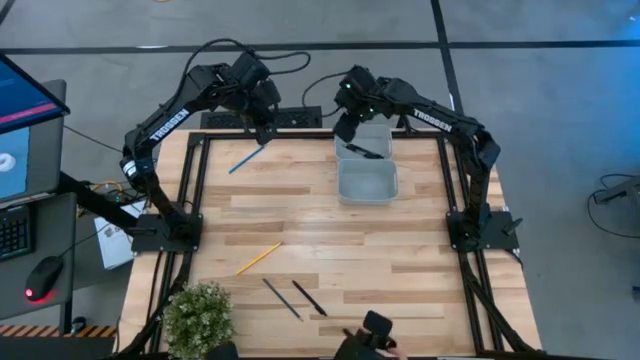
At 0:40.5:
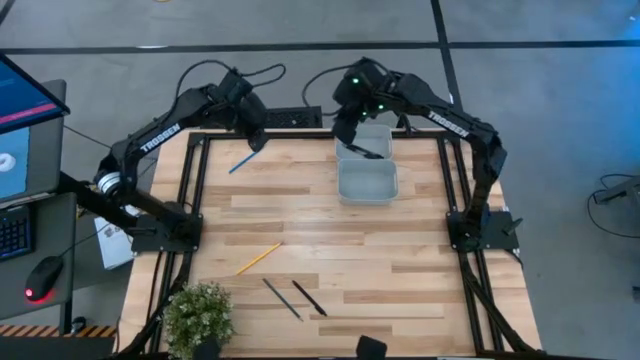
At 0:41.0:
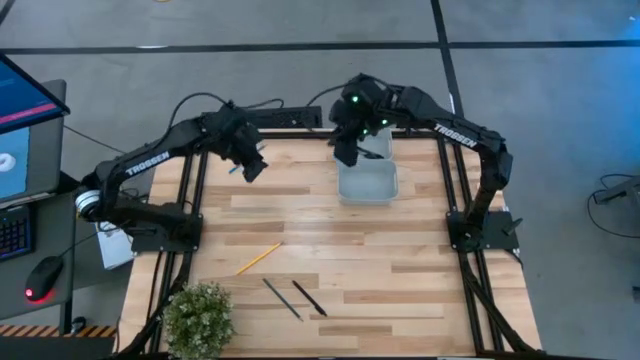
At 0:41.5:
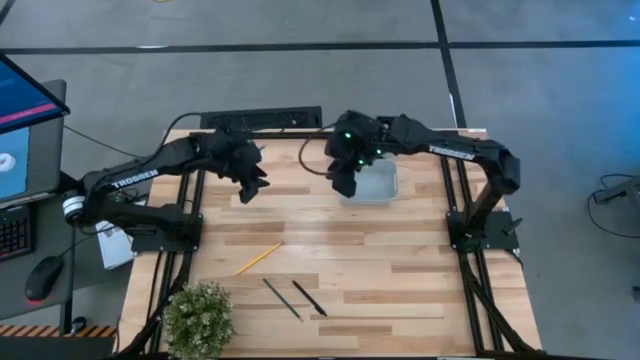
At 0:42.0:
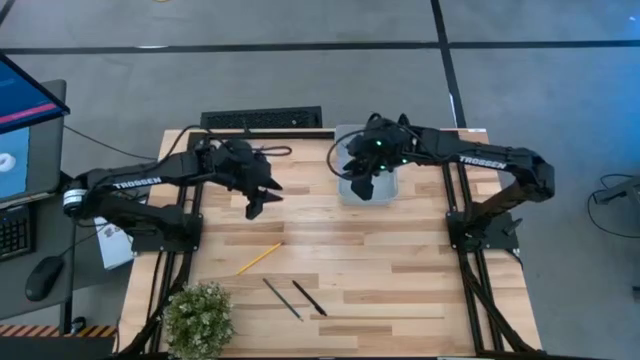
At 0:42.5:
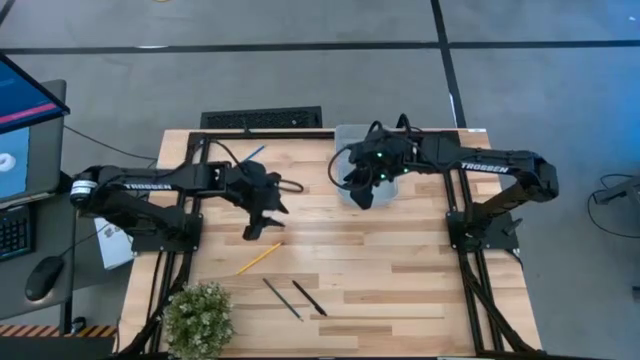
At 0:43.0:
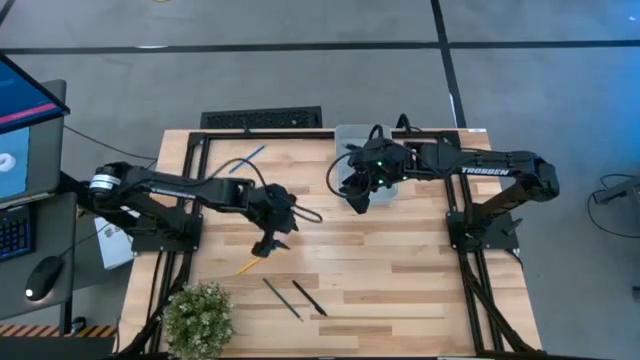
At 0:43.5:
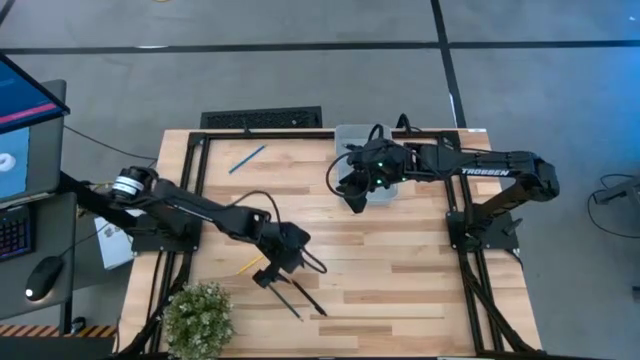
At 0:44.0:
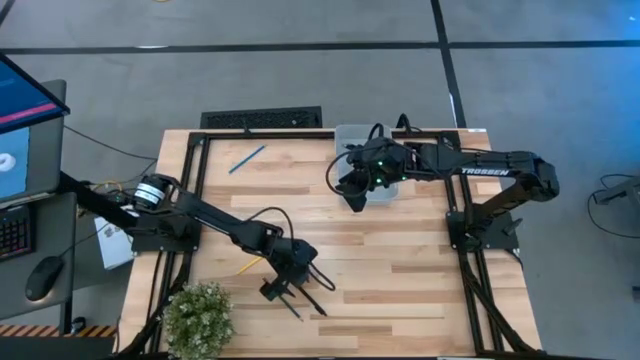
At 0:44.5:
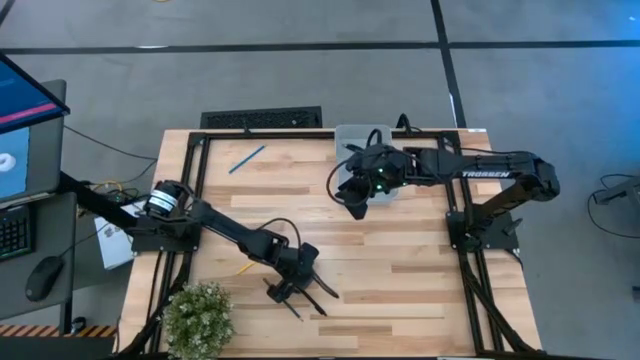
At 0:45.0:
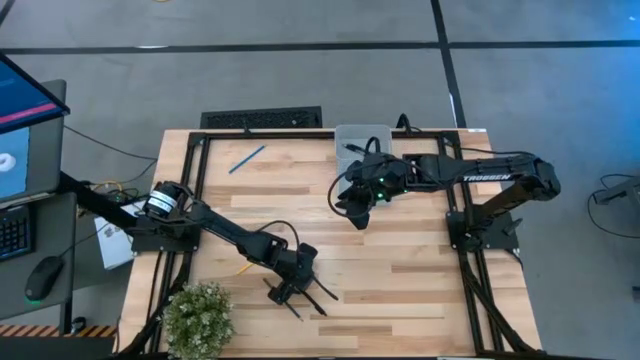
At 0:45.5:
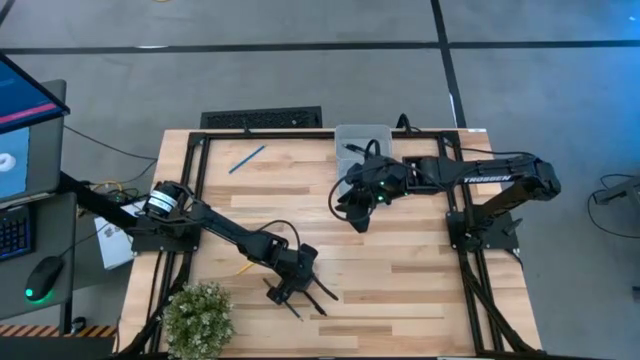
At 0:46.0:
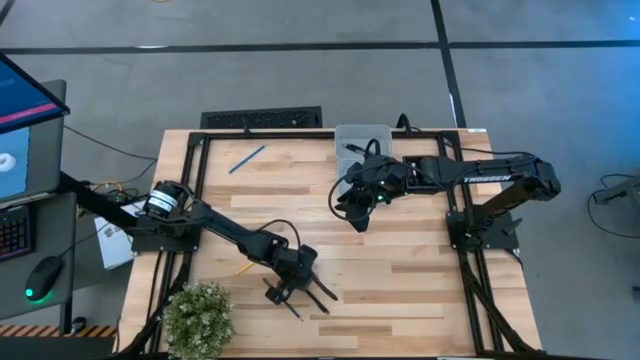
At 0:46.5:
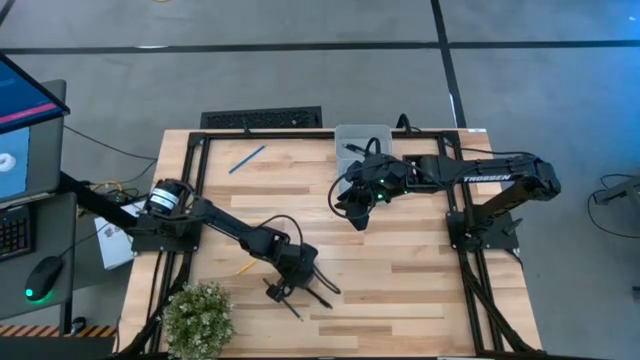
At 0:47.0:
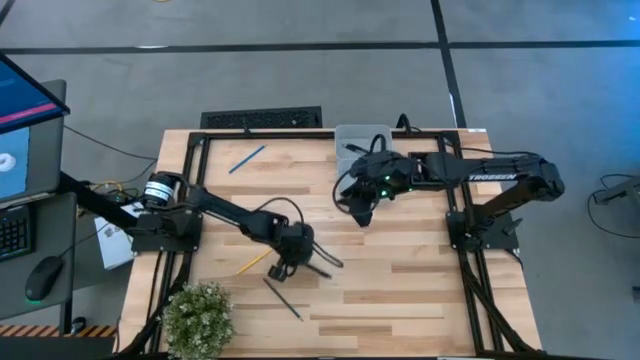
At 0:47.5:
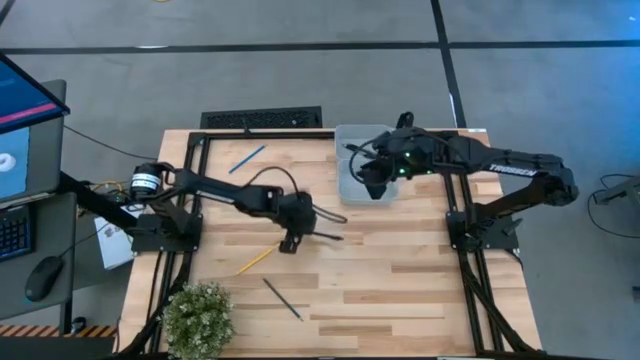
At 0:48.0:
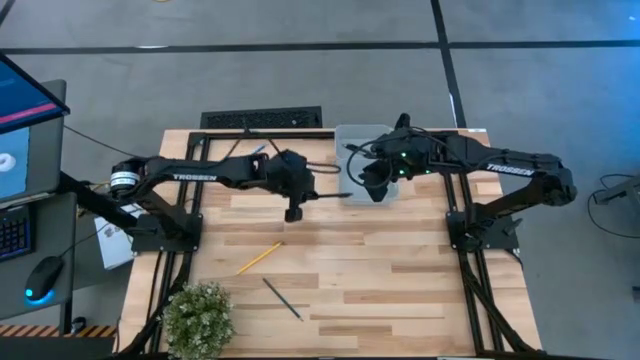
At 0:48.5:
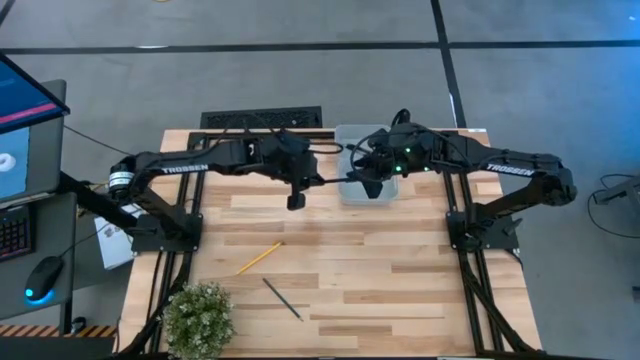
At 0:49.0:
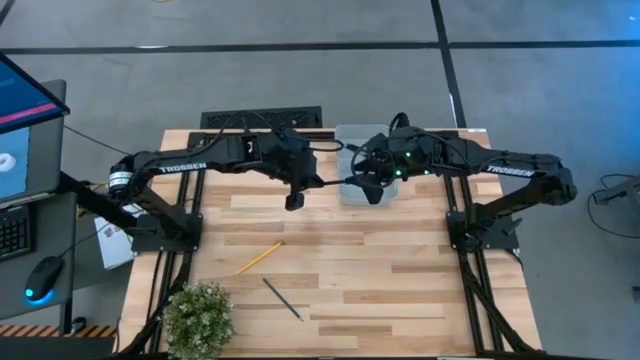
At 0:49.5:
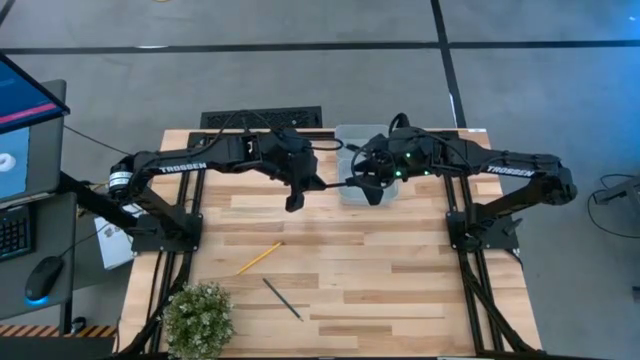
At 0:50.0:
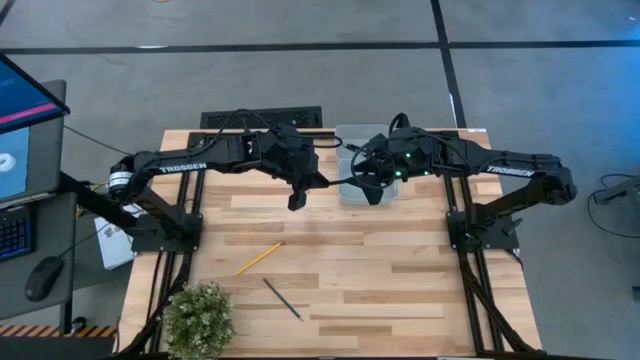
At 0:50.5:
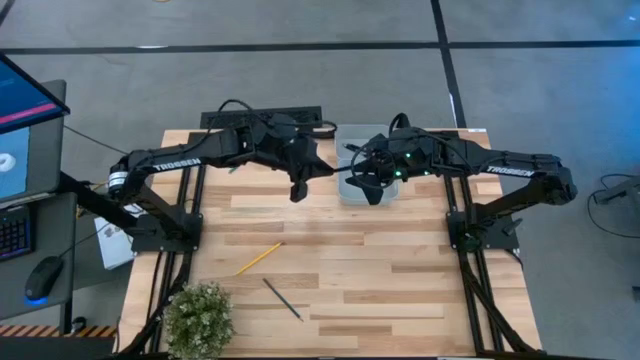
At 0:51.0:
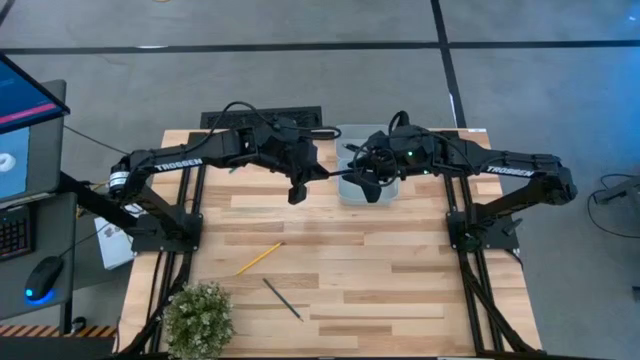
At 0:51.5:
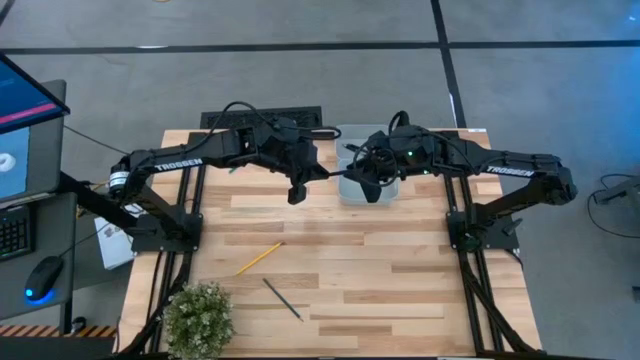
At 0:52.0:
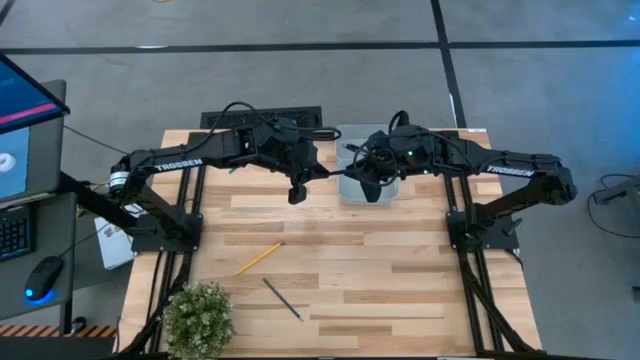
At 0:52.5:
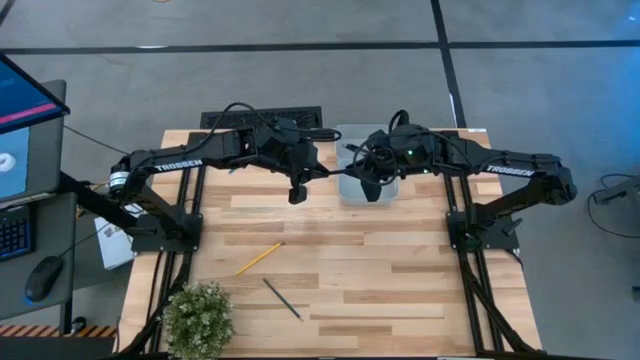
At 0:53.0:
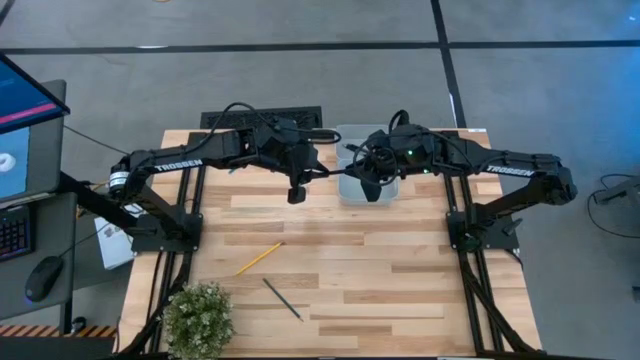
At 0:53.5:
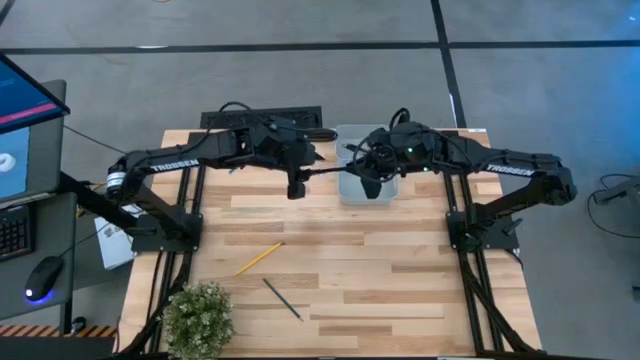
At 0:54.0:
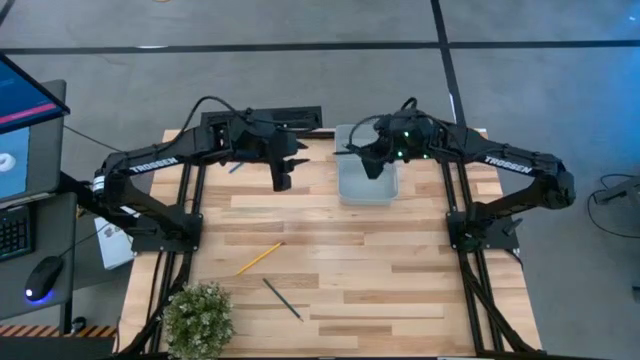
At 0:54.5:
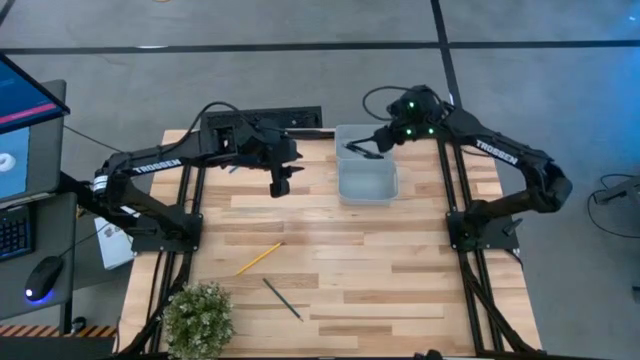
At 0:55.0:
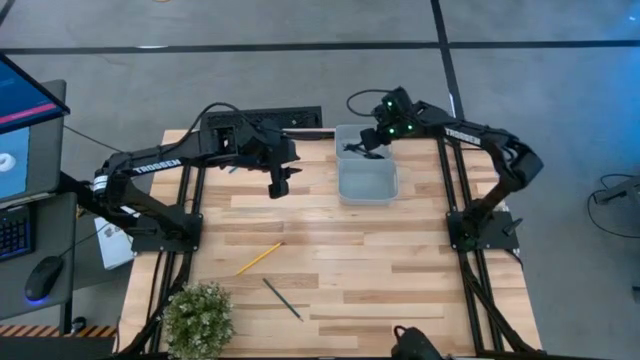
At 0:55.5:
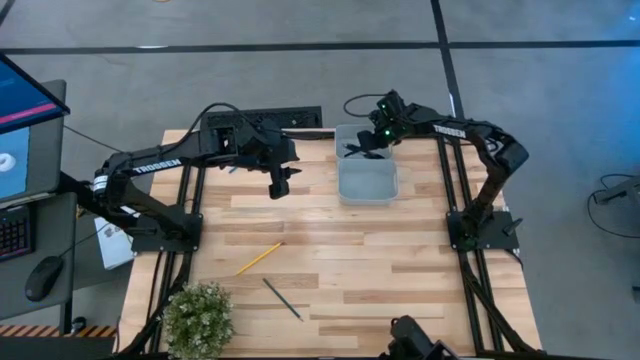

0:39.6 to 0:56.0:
Task: Sort pens & pencils
Put the black pen into the top bin

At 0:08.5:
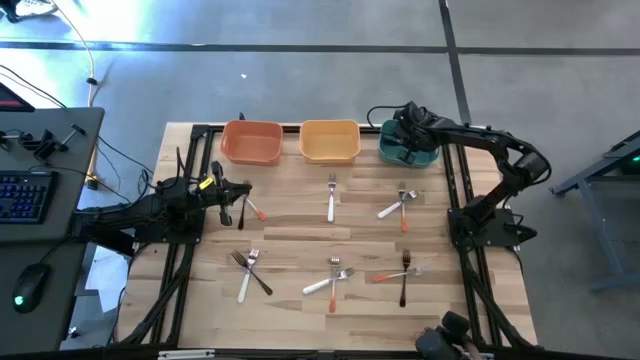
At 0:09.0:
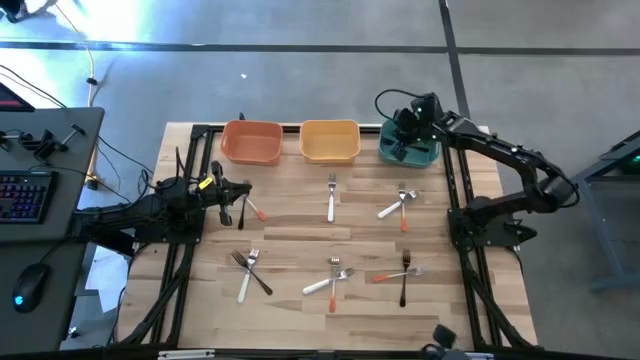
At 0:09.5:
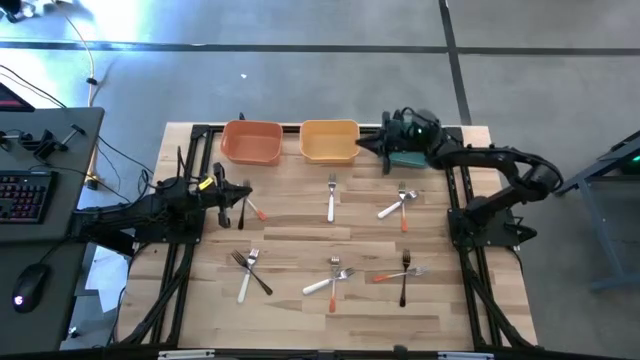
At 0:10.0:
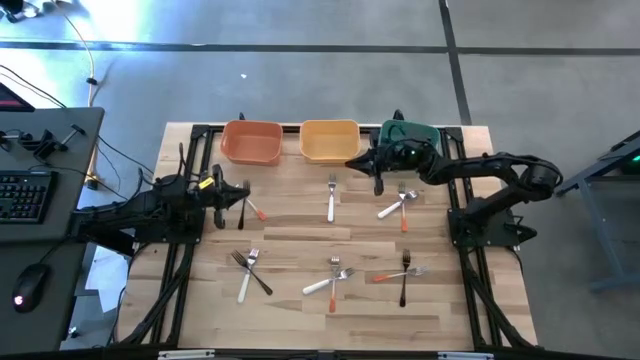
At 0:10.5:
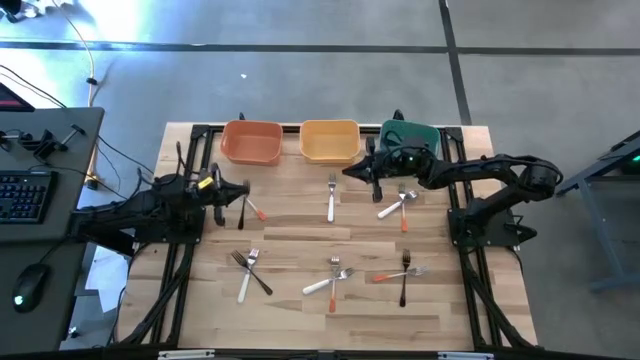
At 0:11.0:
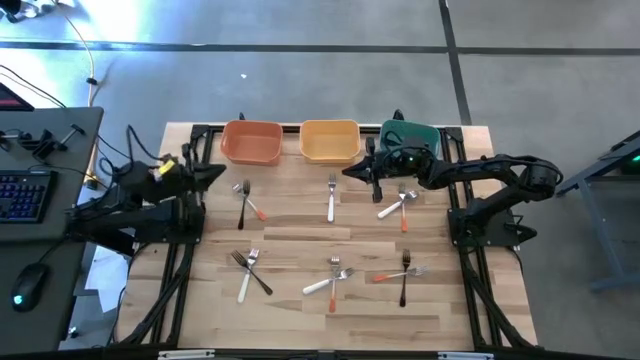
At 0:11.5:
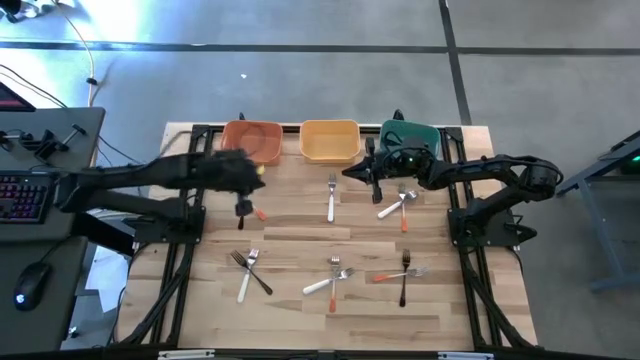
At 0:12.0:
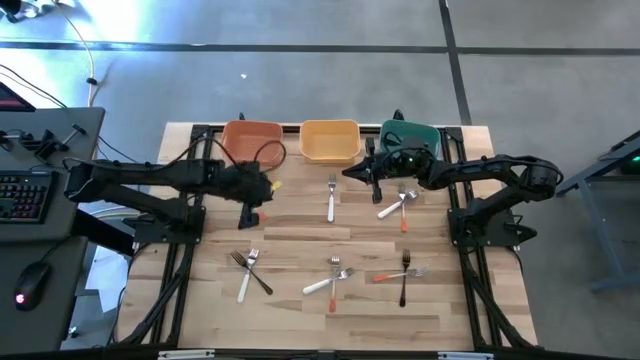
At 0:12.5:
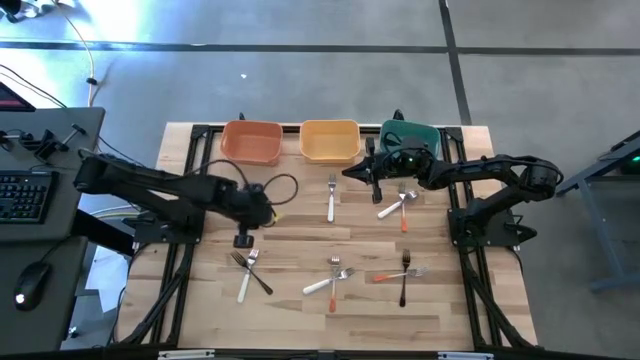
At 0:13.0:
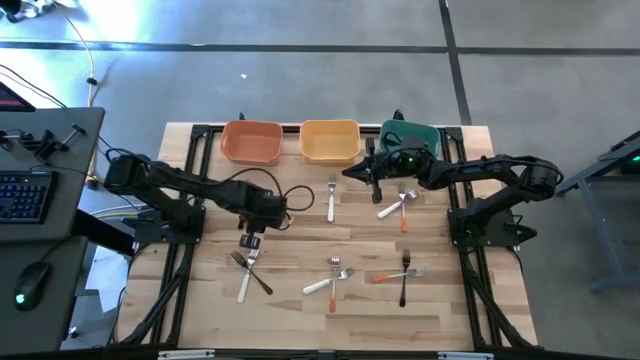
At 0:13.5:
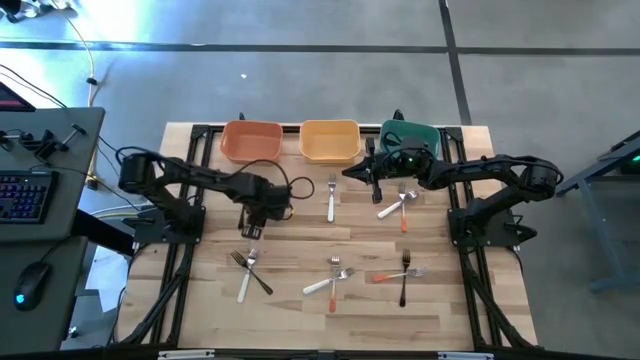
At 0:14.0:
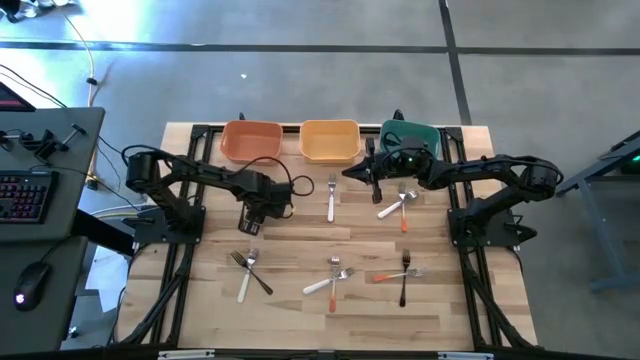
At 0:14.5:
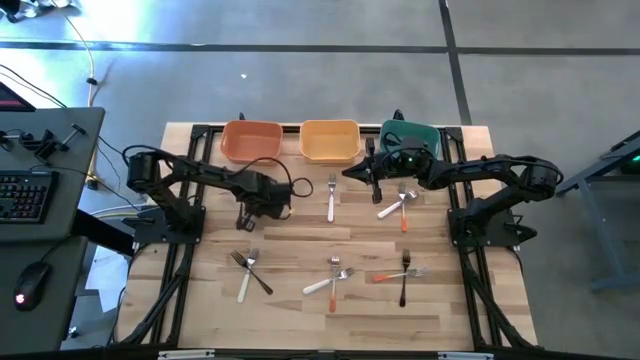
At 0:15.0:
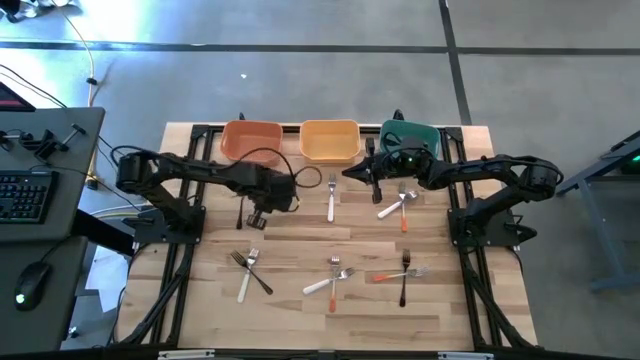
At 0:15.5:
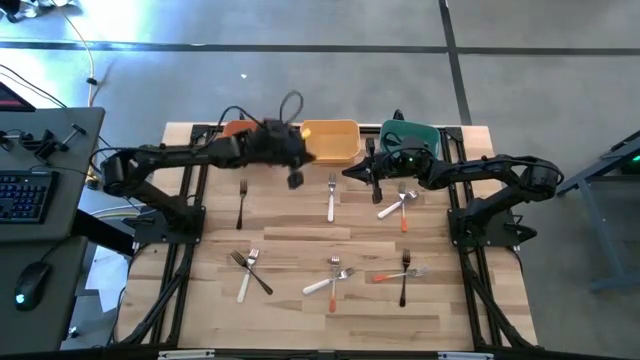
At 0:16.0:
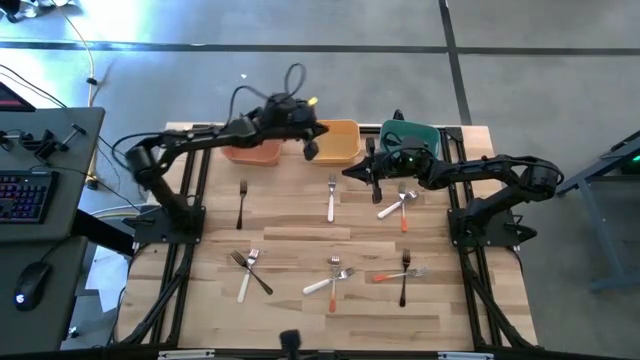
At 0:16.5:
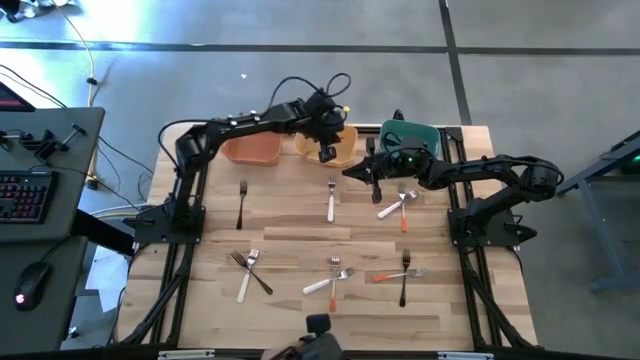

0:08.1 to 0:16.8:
Task: Sort silverware by color (type)
Put the orange fork into the yellow bin
